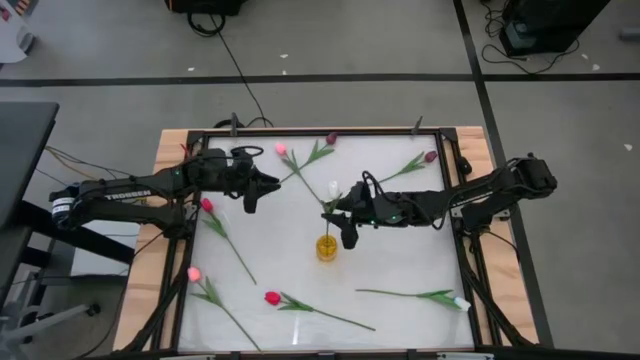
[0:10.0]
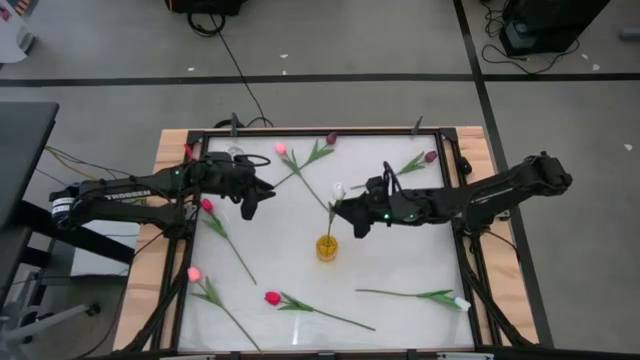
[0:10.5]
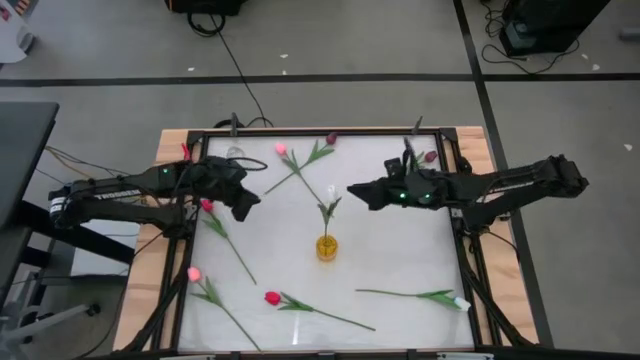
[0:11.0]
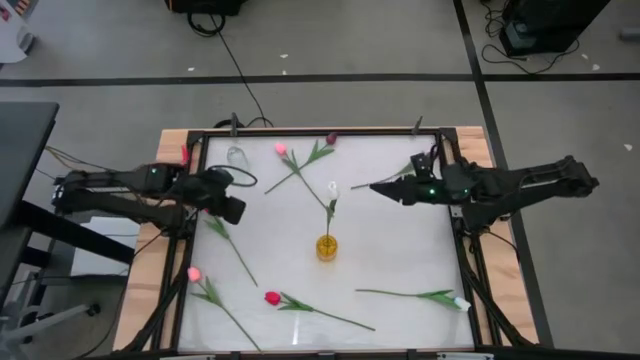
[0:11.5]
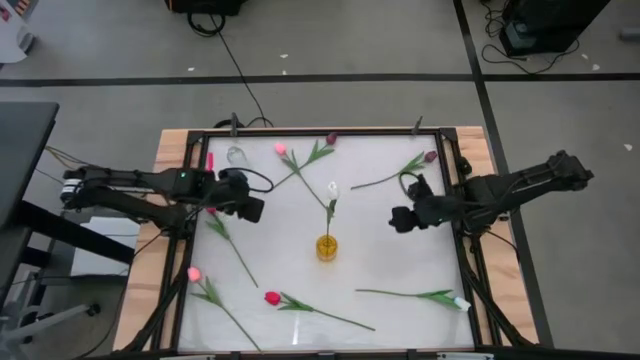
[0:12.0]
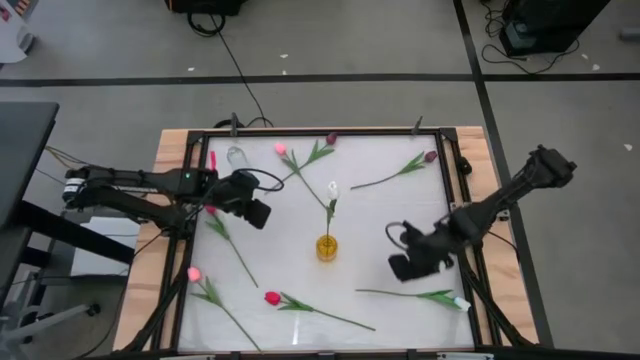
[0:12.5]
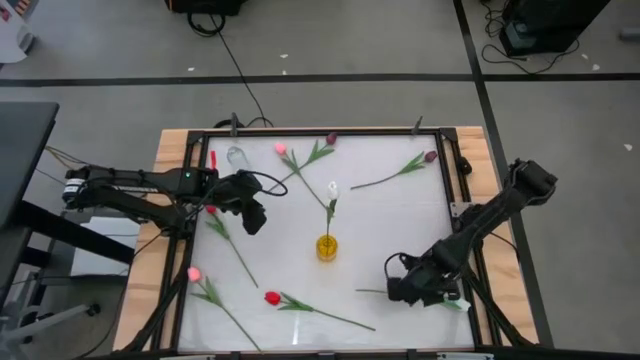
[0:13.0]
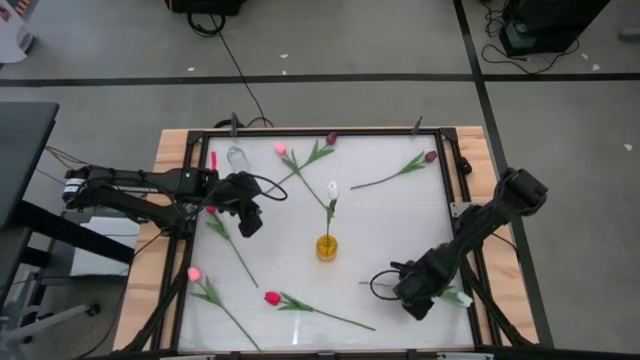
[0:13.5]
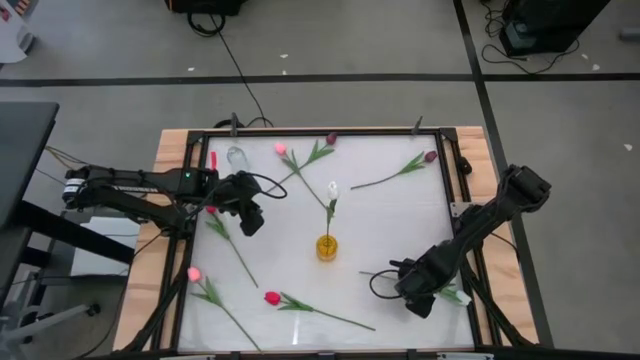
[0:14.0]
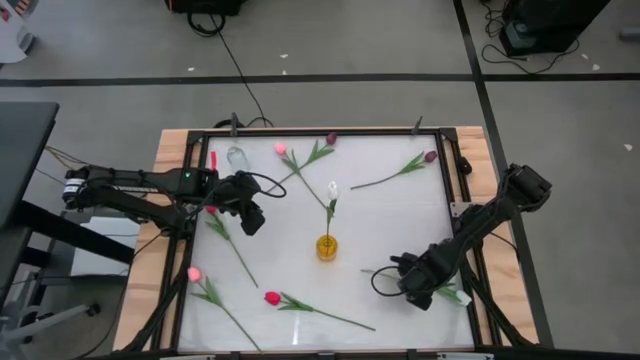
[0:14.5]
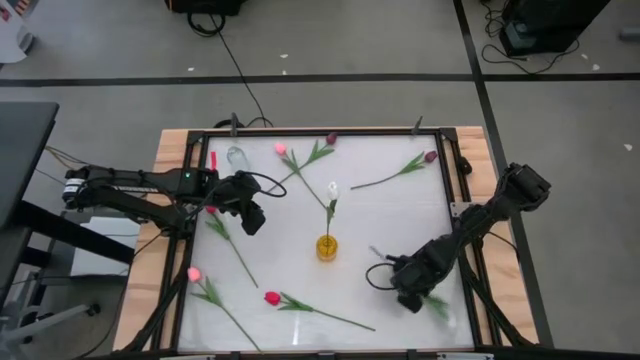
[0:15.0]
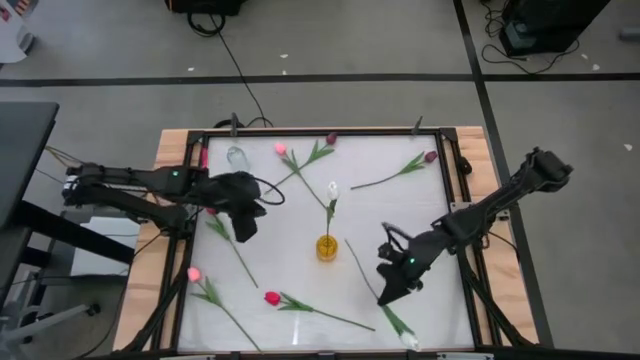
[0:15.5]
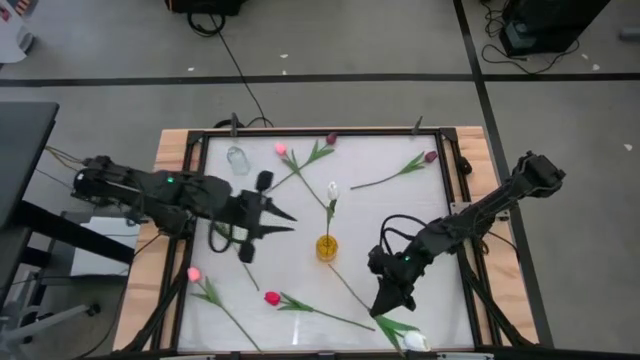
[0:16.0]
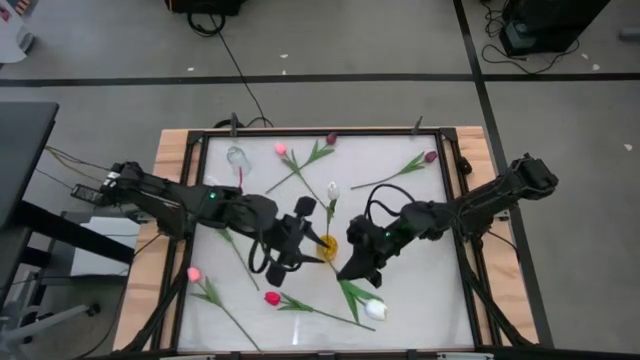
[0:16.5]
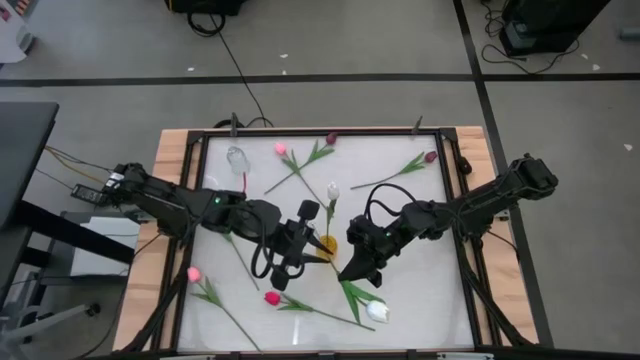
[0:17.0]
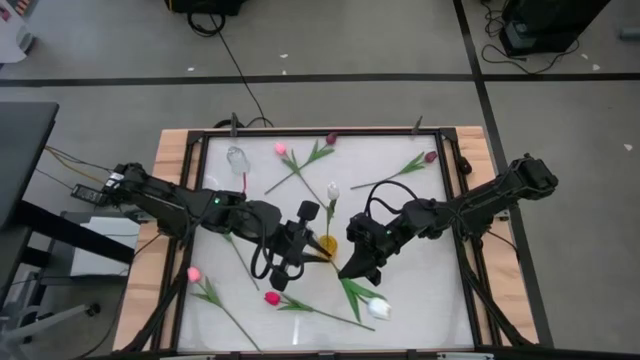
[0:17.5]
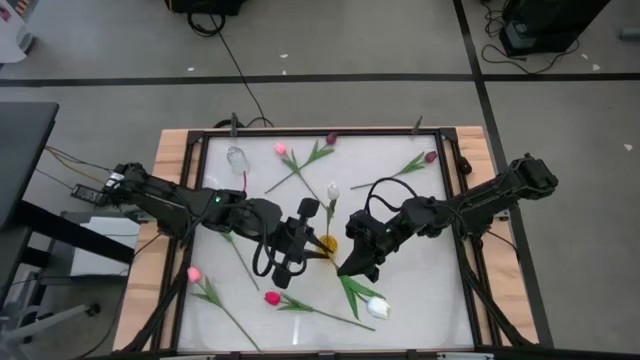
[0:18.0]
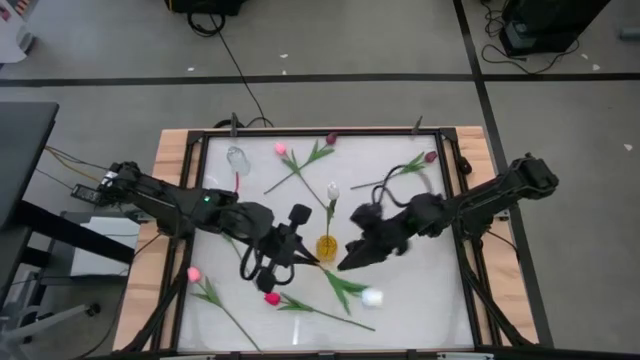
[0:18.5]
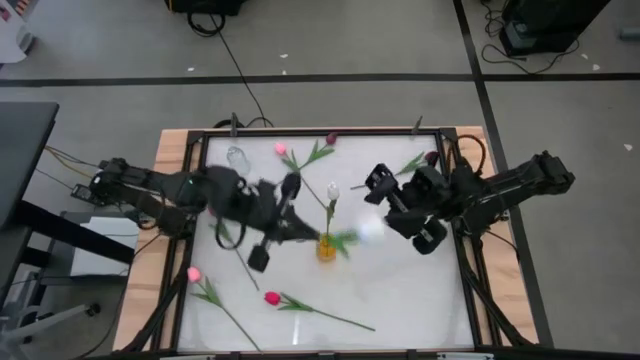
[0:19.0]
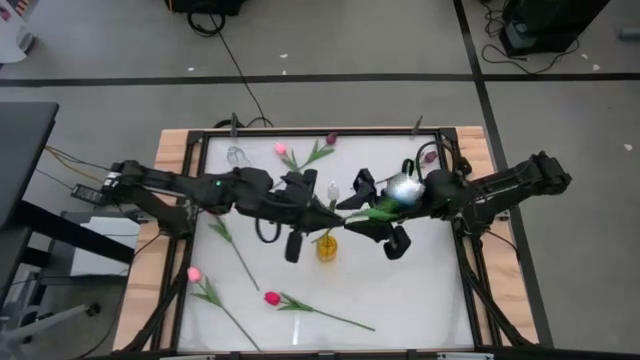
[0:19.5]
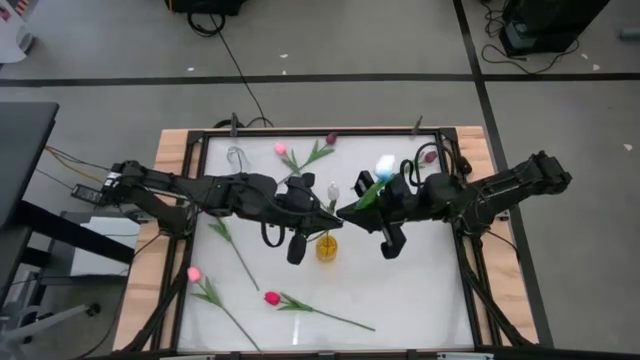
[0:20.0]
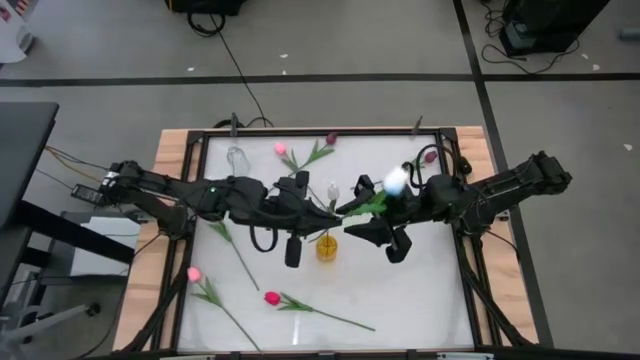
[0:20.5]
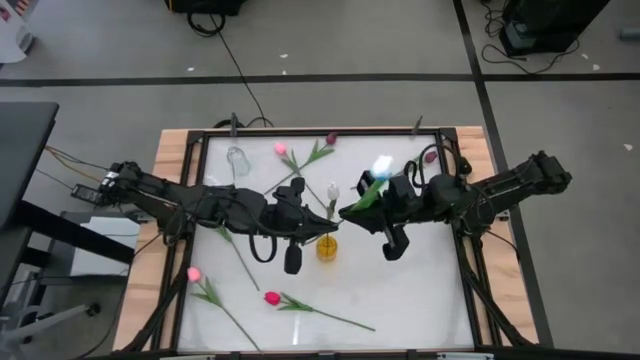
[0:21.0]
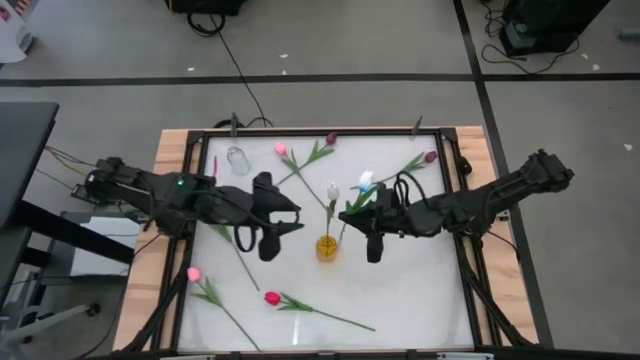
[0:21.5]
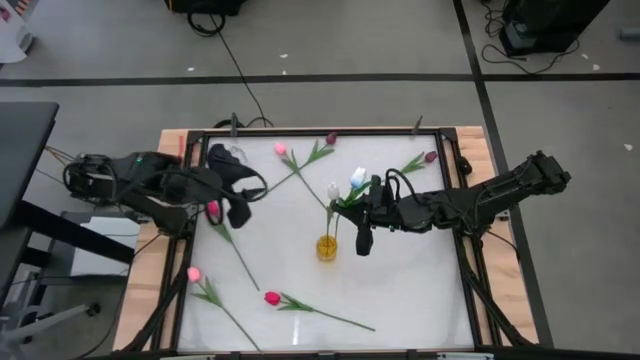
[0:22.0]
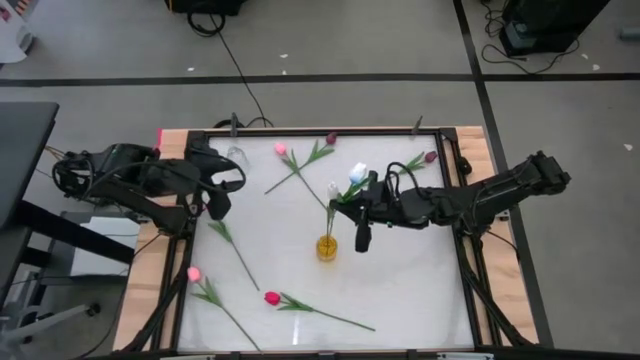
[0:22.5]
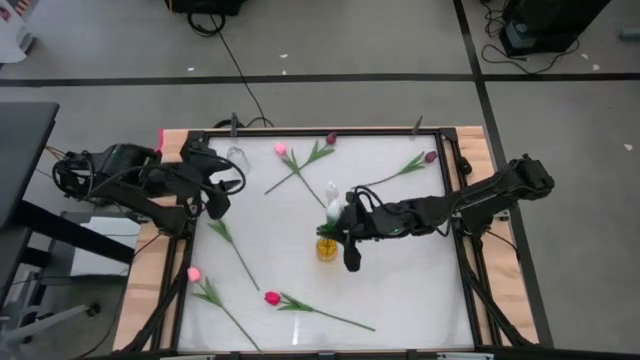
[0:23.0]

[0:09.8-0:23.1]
Task: Sort flowers into vase by color
Put the white tulip into the yellow flower vase

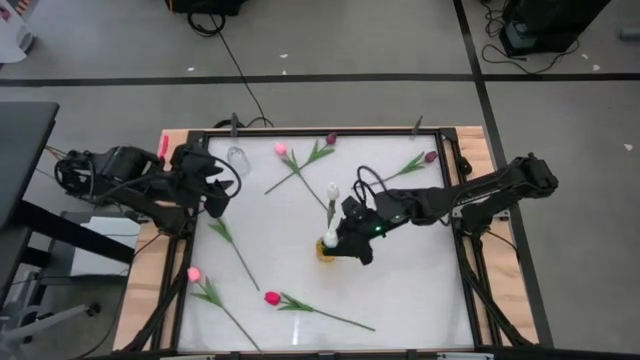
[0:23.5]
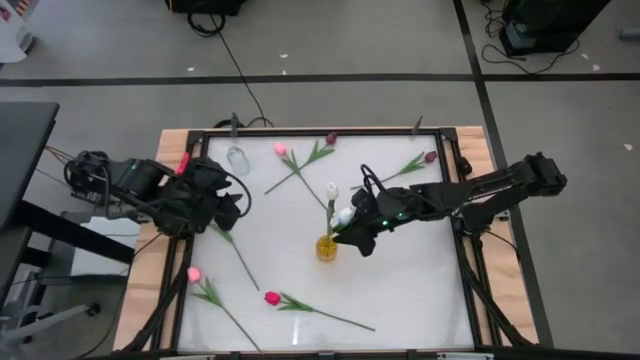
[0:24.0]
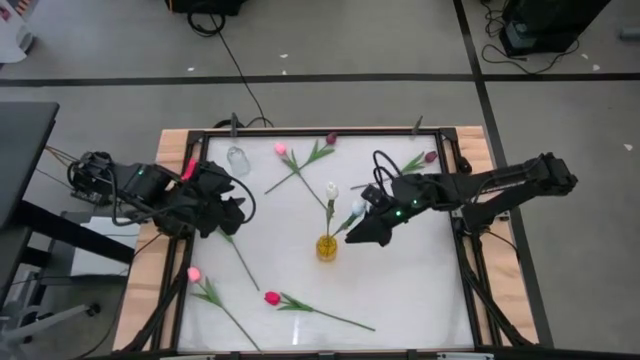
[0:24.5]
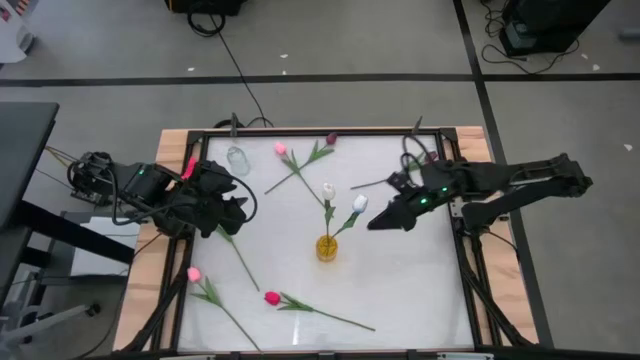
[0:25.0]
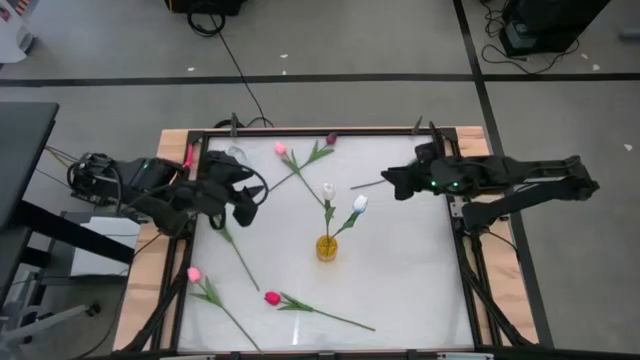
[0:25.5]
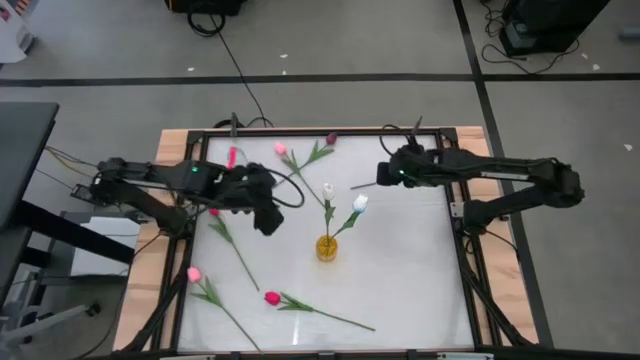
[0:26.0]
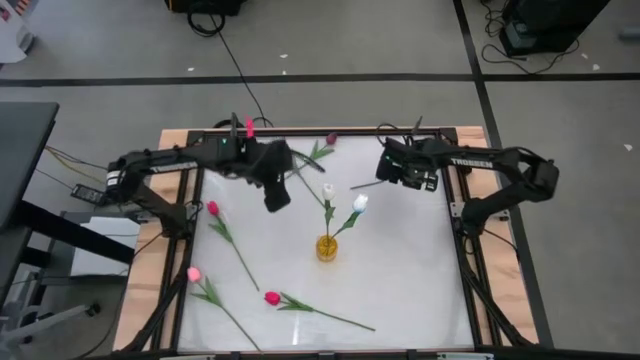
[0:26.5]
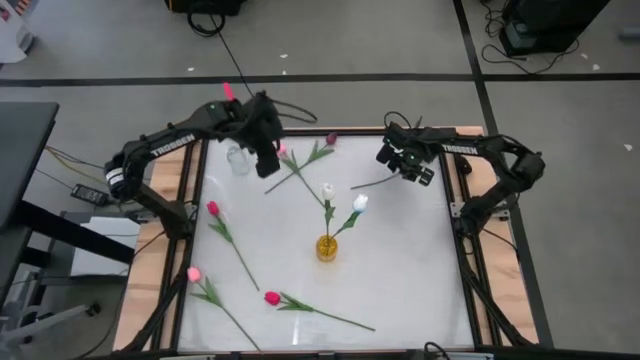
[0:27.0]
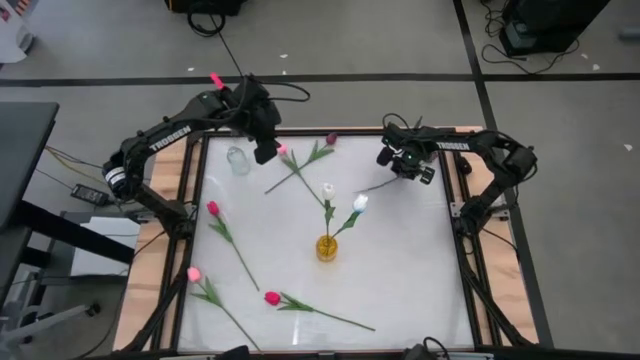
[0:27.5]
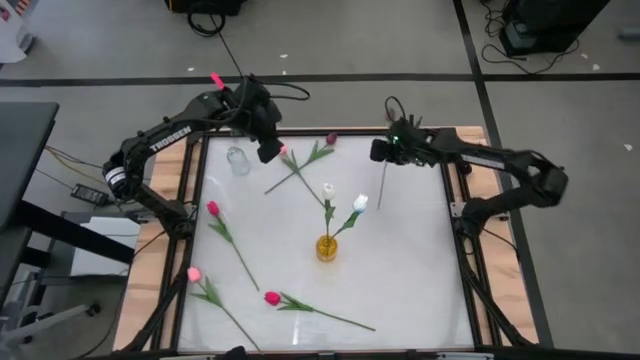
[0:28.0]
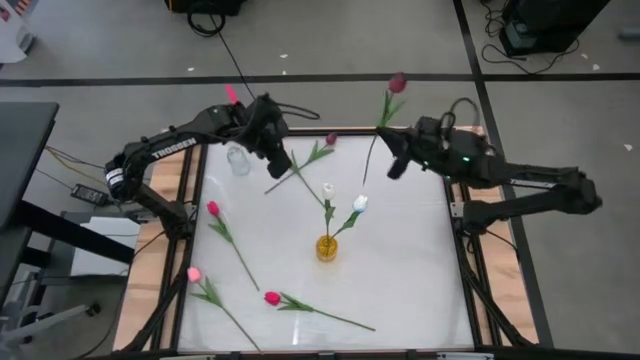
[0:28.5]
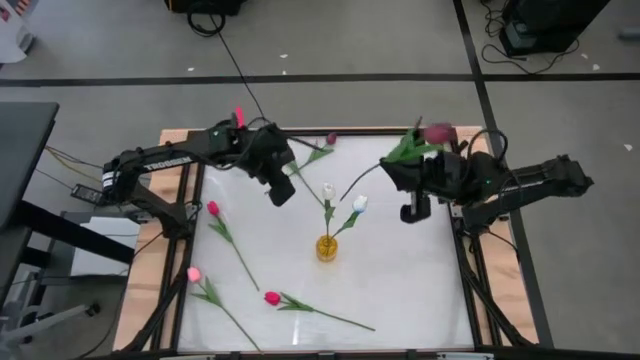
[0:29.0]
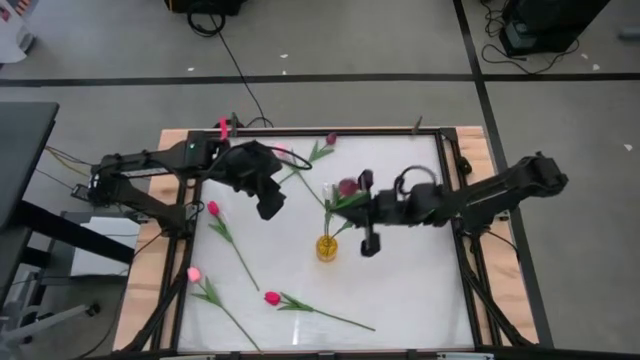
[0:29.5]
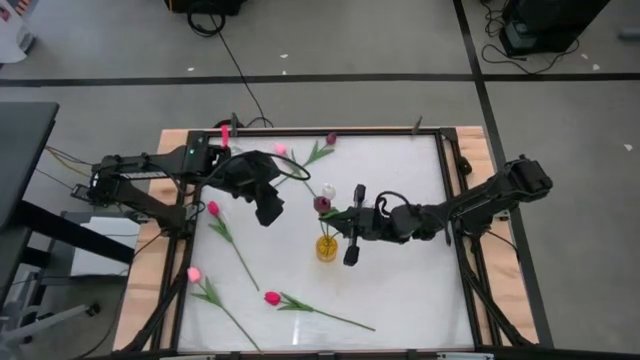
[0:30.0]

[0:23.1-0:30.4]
Put the right dark red tulip into the yellow flower vase
